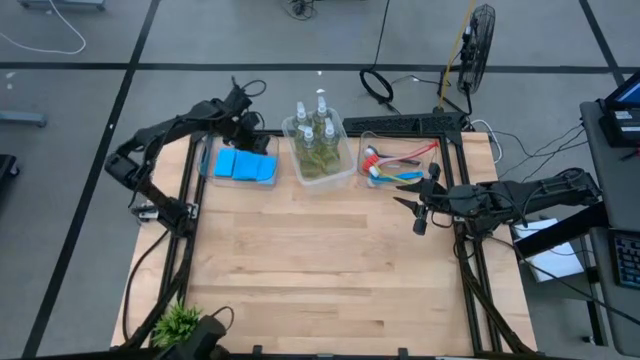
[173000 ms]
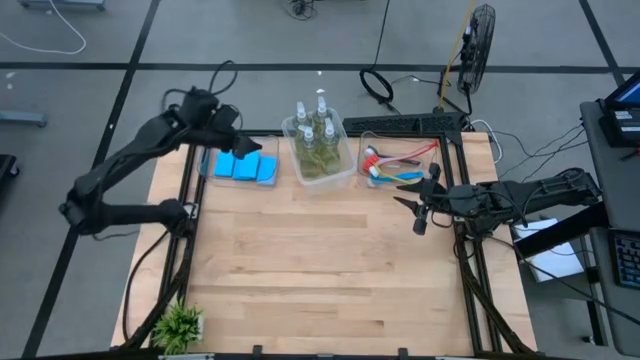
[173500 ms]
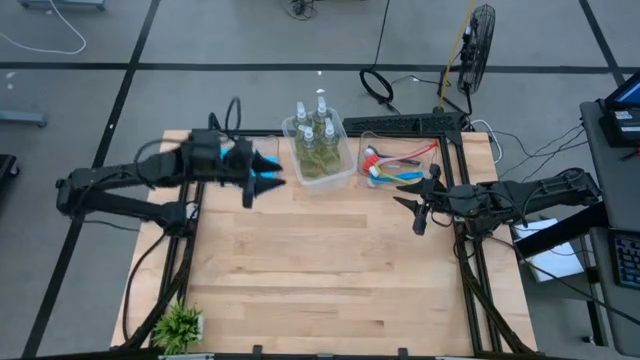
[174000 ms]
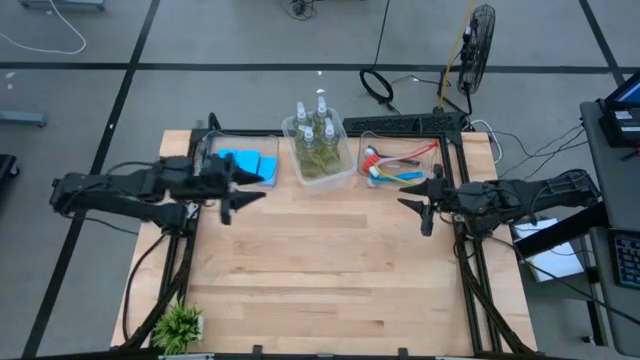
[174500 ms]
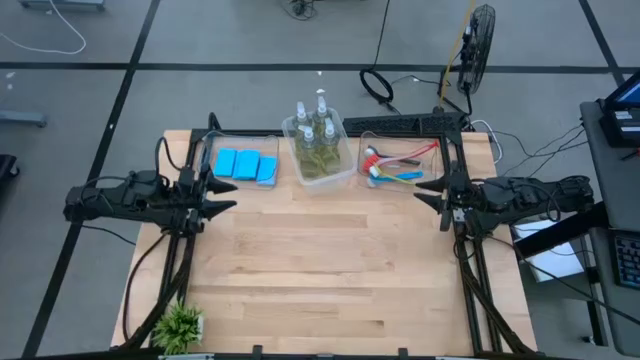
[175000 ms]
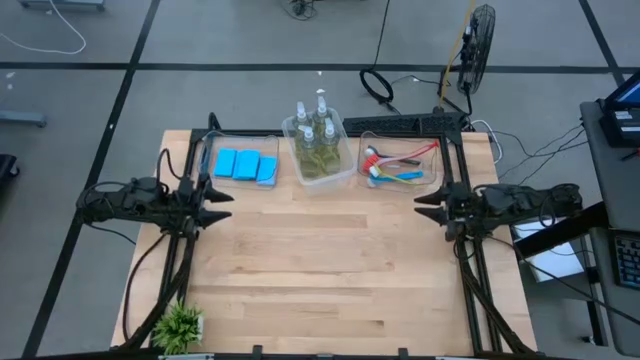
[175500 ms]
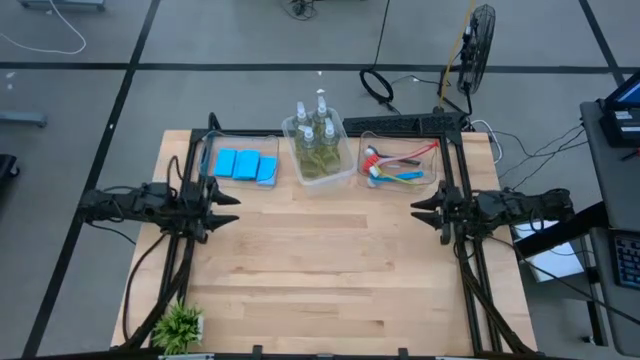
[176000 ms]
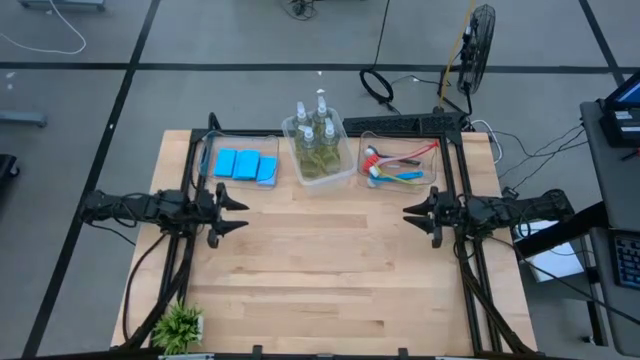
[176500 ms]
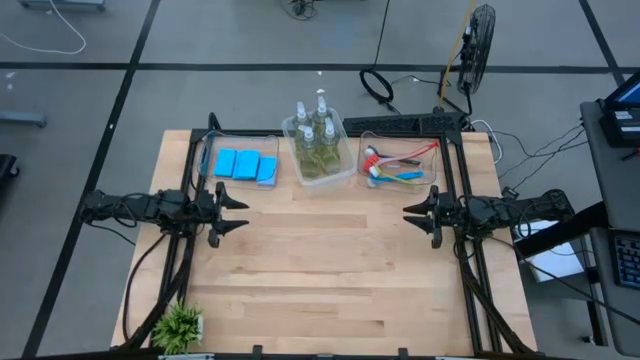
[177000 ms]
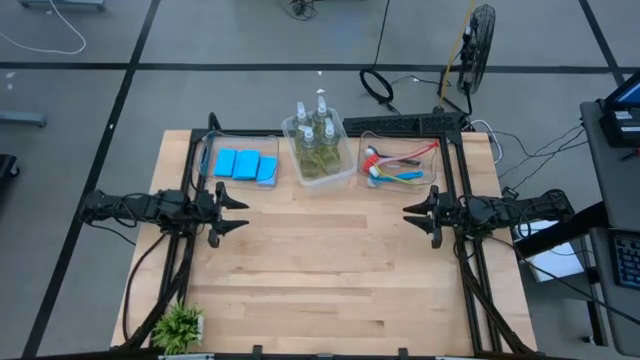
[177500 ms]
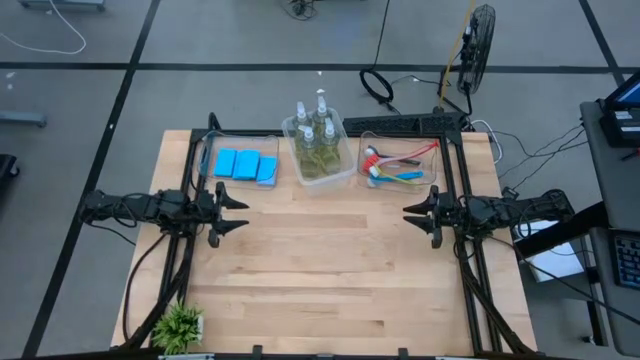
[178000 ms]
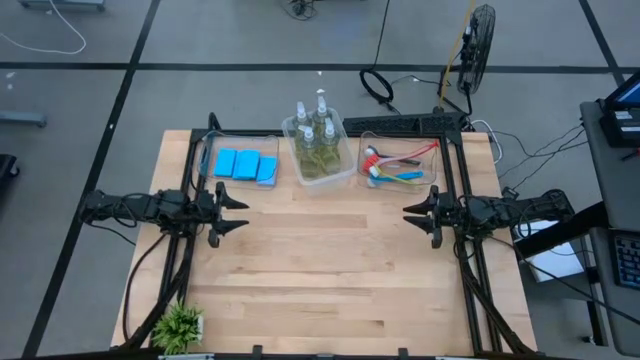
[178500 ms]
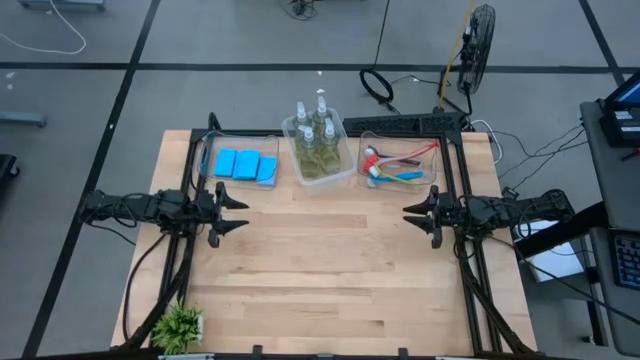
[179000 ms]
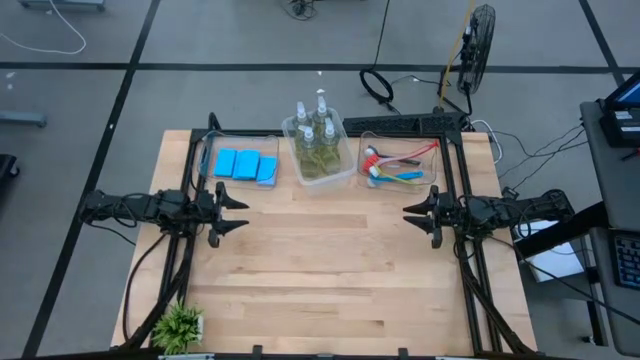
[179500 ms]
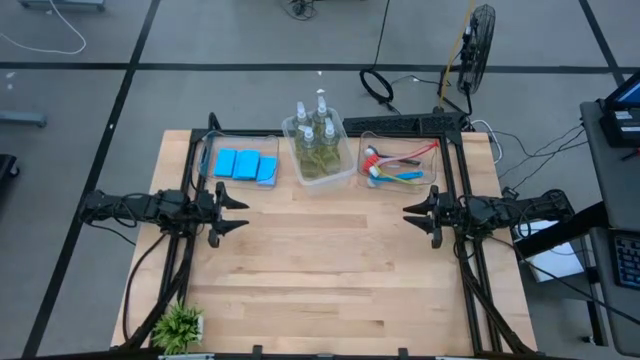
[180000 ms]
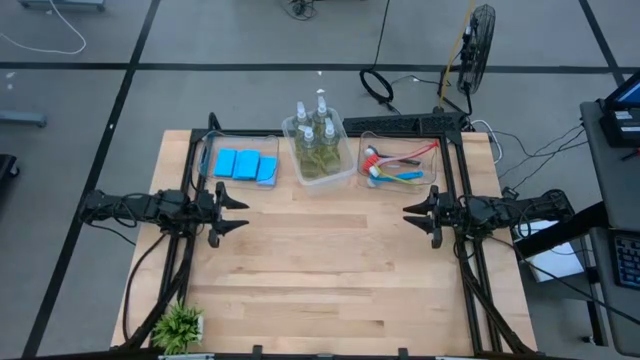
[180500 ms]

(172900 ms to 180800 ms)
Task: Pick & Place Kitchen Sink Supplies
Return to home position
